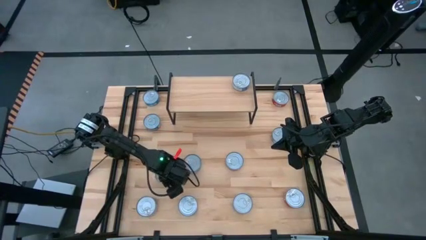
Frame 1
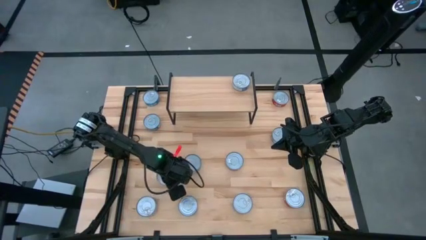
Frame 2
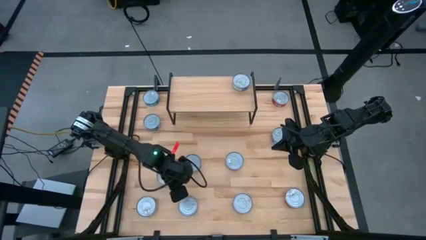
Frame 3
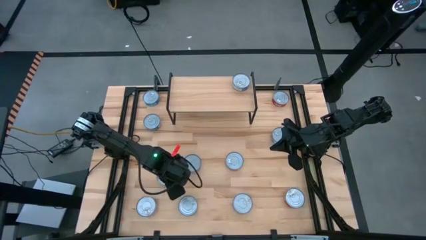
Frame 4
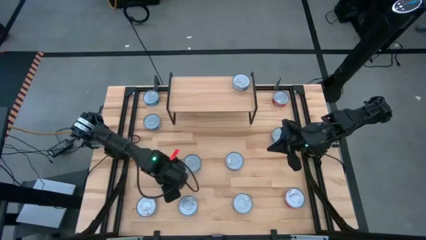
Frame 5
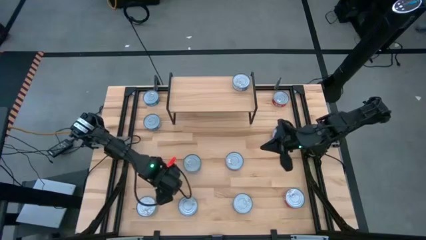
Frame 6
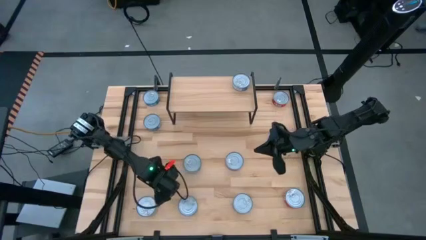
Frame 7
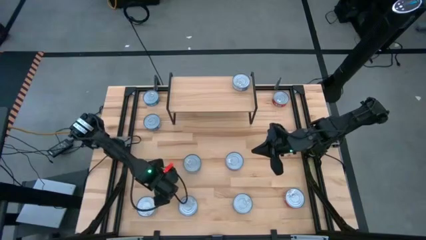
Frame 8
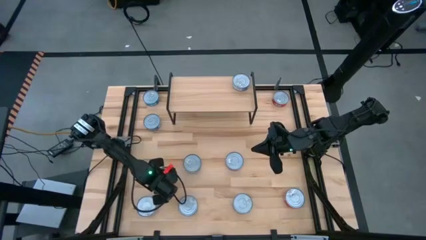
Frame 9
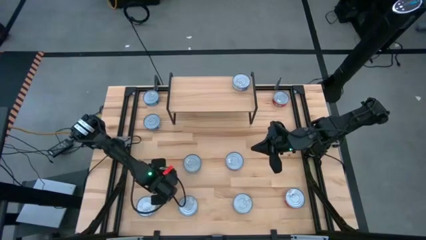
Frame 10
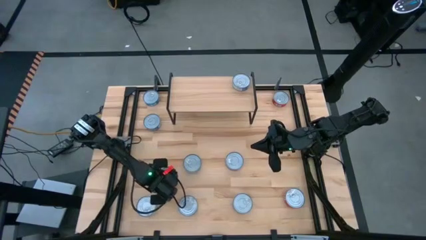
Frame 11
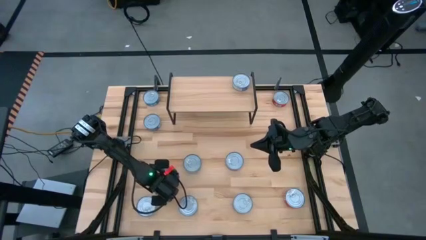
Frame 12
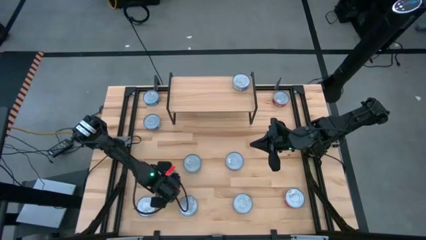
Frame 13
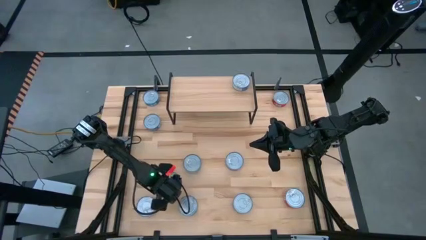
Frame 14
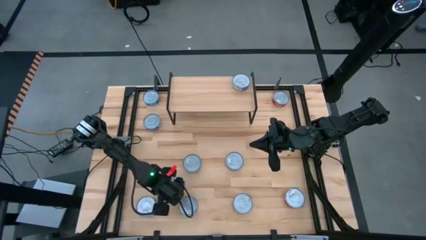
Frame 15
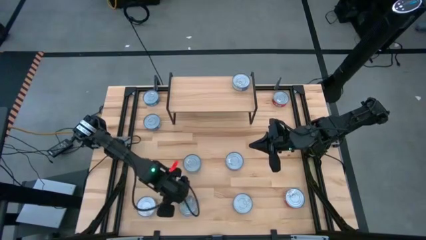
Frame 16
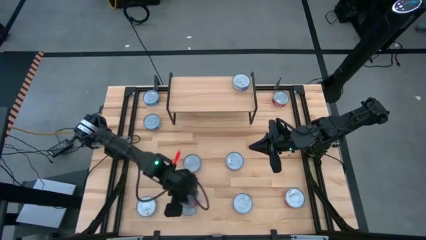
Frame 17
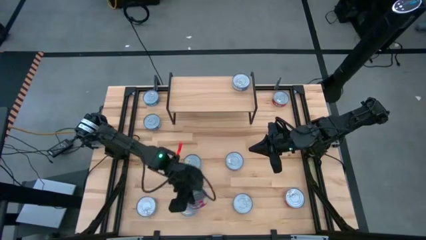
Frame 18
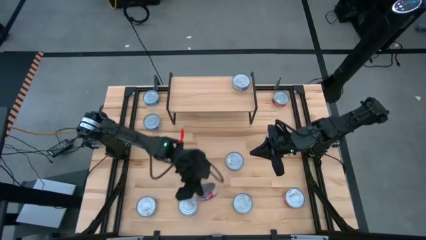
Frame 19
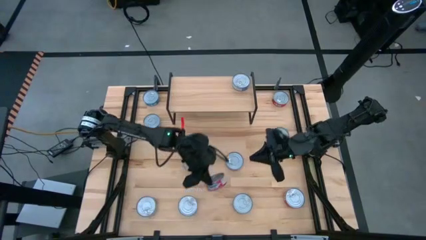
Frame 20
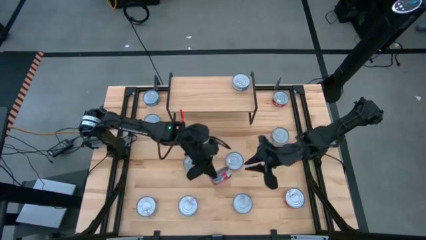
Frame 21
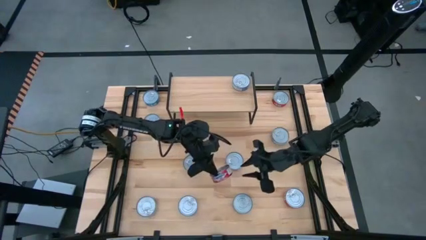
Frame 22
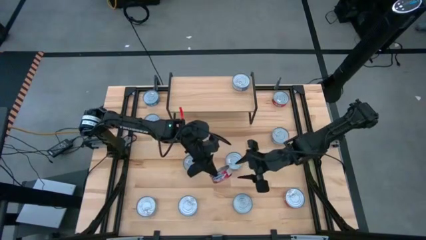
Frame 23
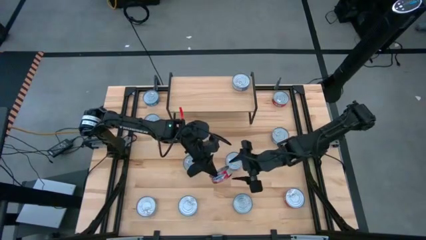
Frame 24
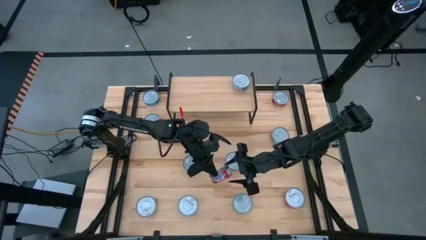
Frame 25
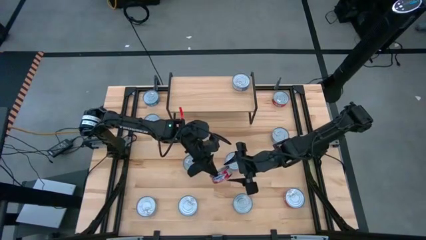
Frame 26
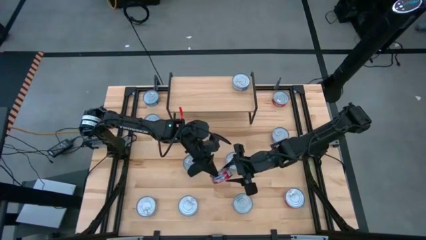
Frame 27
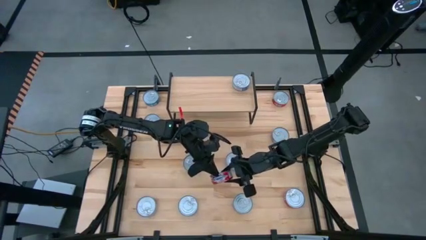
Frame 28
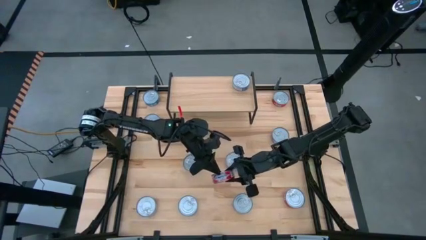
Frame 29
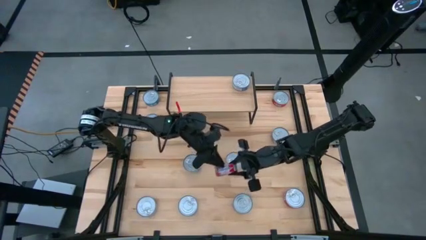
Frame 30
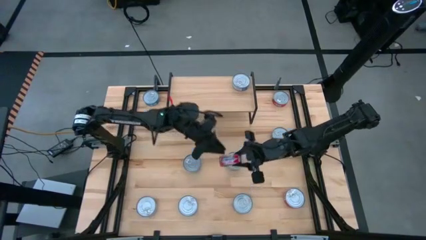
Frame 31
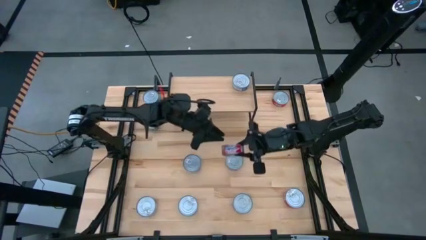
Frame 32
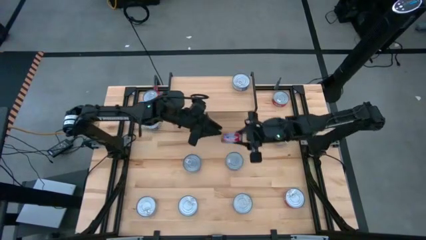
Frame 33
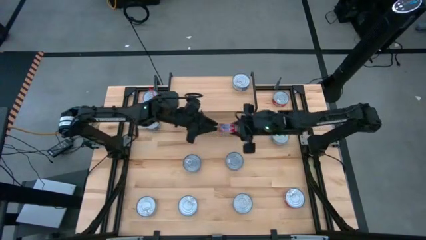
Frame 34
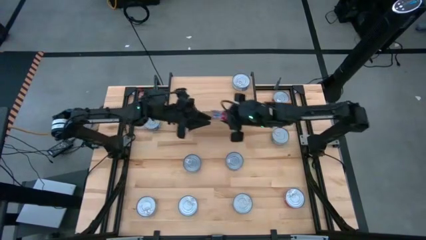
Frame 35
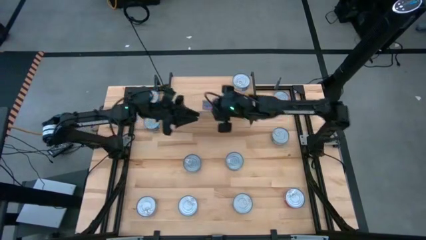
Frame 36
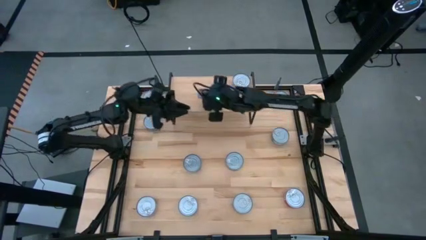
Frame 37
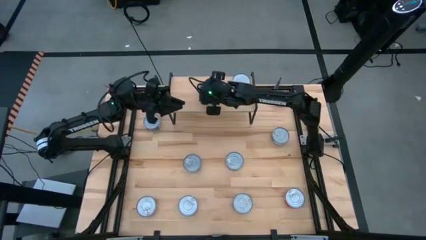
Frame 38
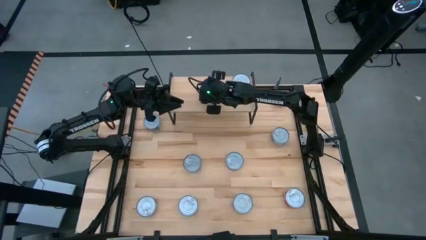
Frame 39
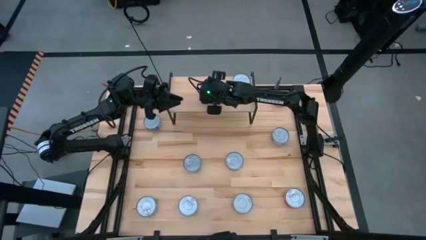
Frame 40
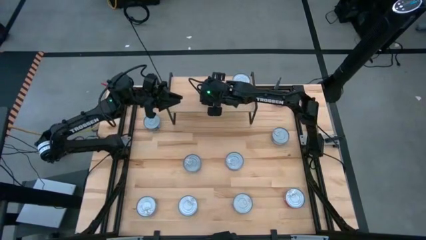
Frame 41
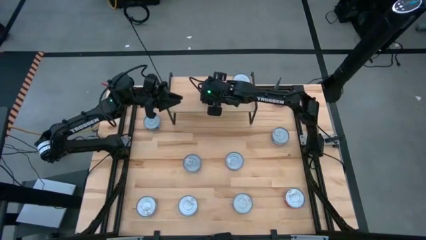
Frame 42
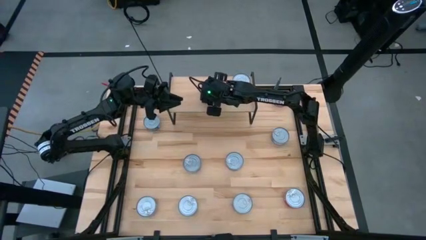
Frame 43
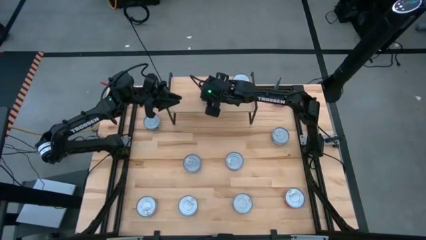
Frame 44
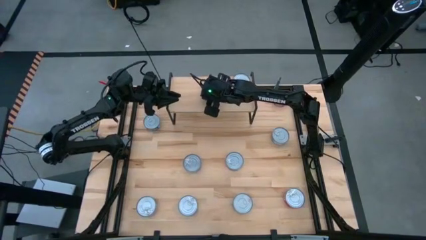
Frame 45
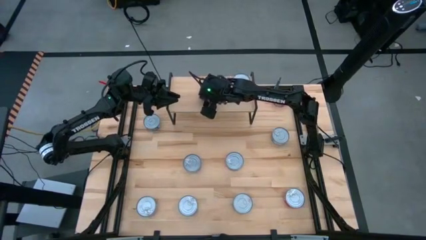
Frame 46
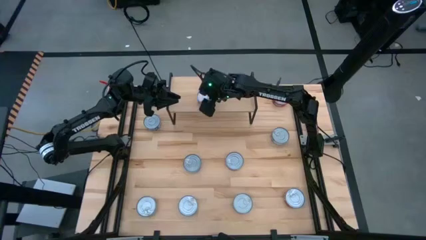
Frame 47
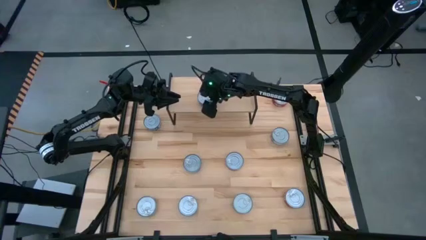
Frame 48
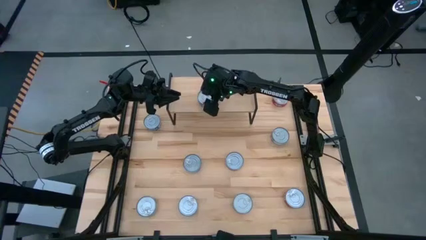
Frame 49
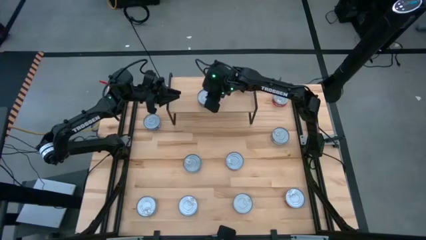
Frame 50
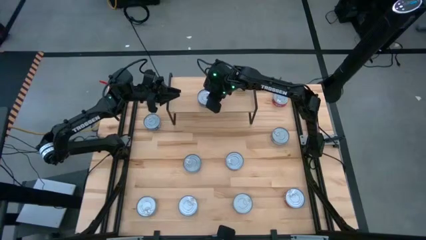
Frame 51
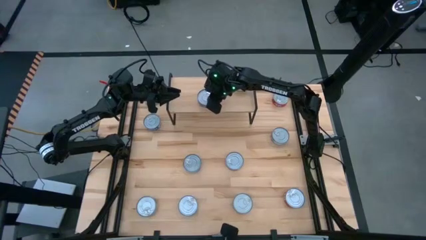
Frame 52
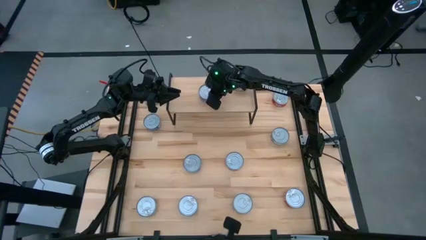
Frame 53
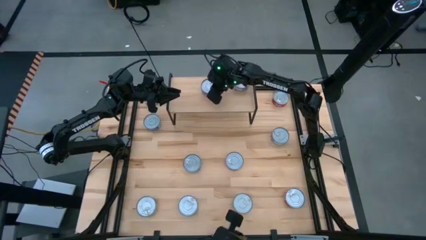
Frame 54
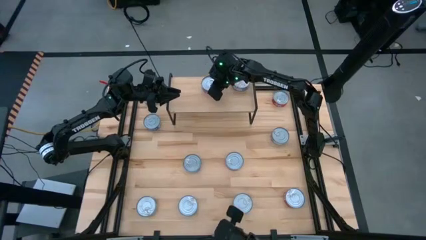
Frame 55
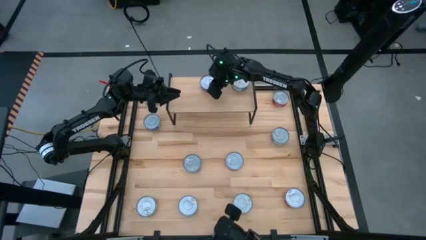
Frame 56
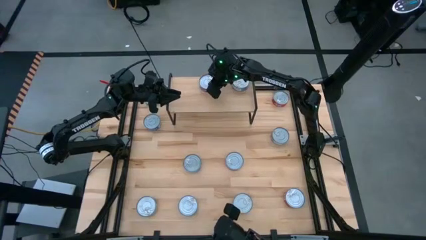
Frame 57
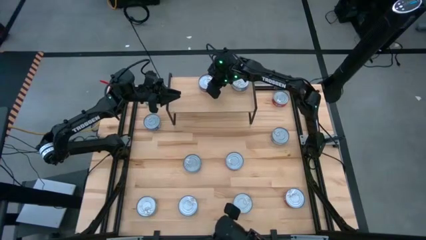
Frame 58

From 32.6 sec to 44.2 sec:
Task: Stack canned seafood by type on shelf
Put the middle left red tuna can on the shelf

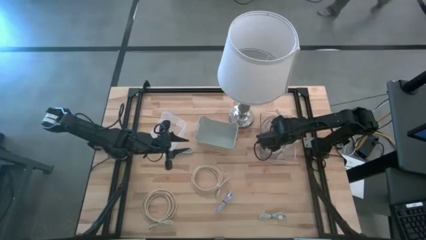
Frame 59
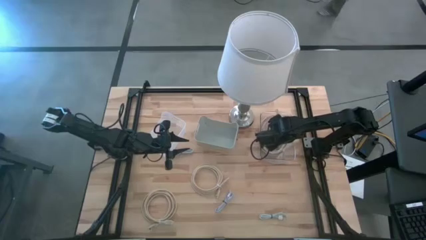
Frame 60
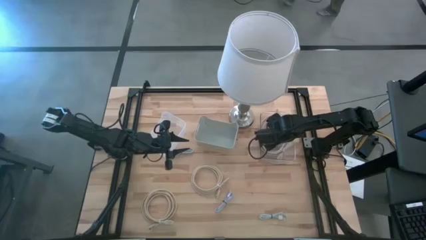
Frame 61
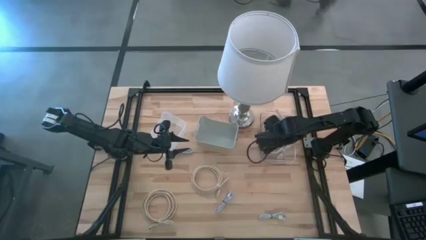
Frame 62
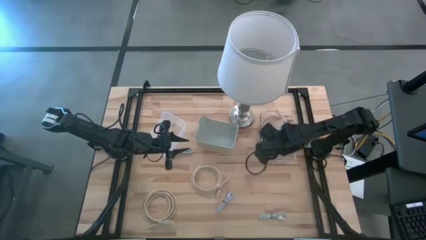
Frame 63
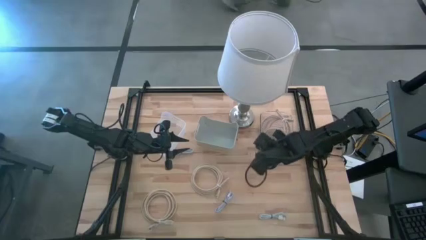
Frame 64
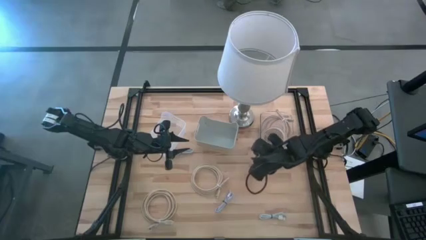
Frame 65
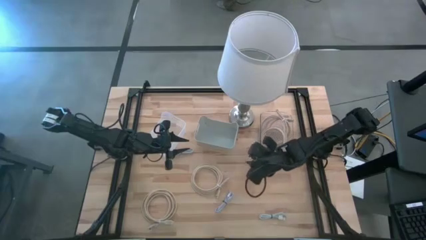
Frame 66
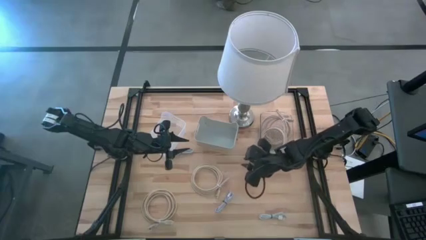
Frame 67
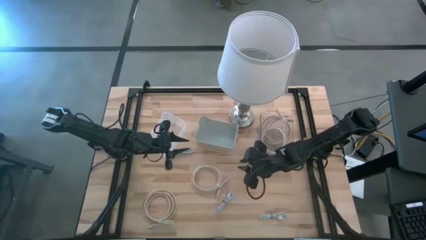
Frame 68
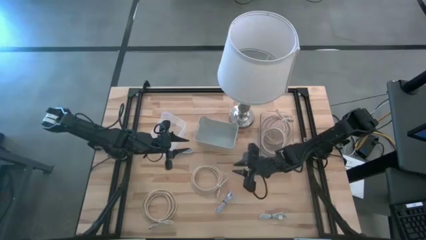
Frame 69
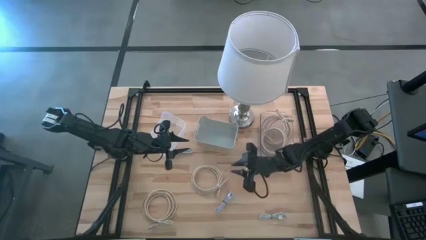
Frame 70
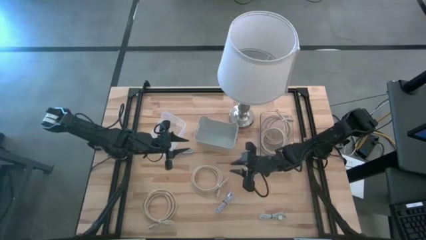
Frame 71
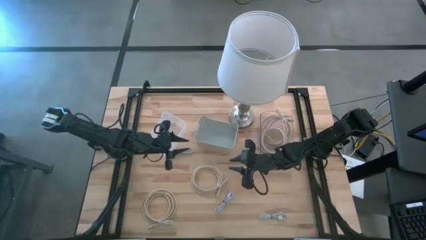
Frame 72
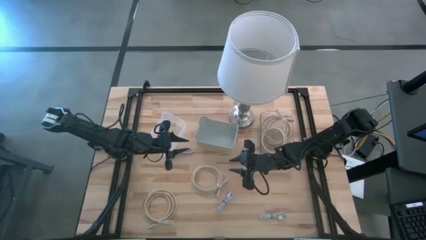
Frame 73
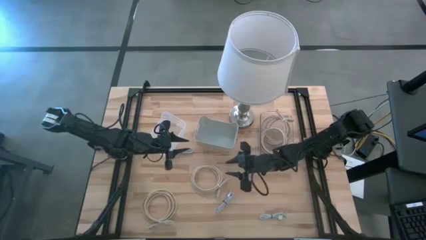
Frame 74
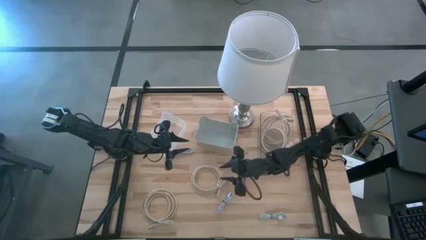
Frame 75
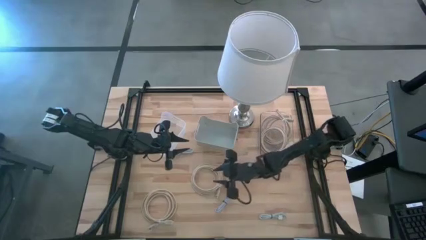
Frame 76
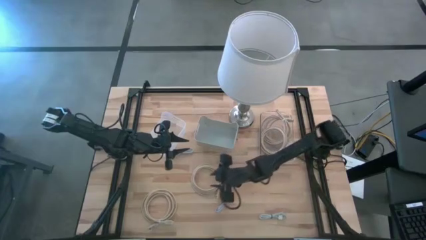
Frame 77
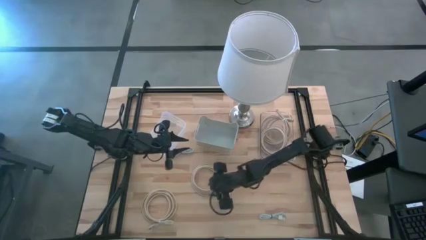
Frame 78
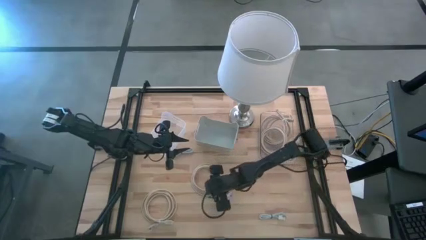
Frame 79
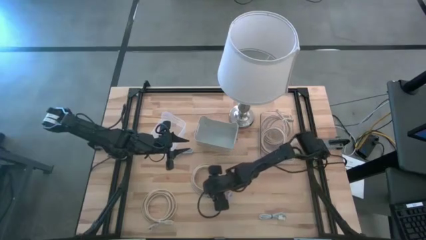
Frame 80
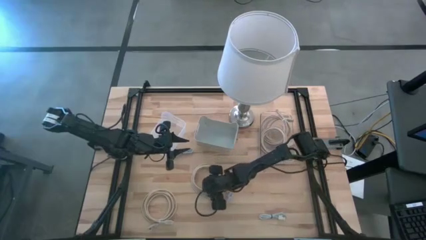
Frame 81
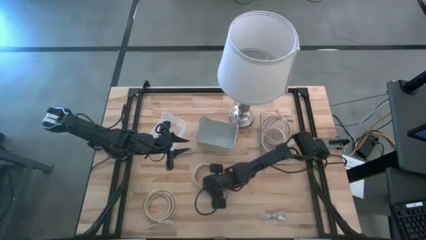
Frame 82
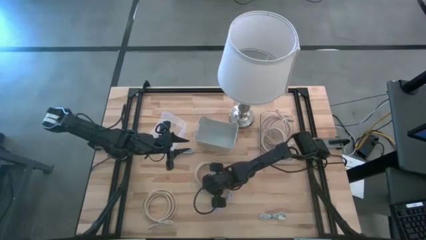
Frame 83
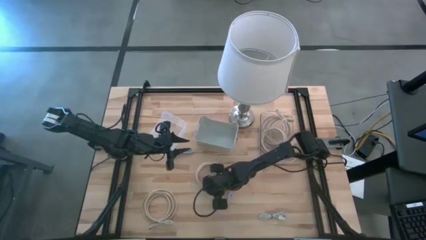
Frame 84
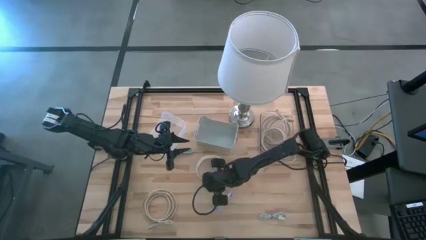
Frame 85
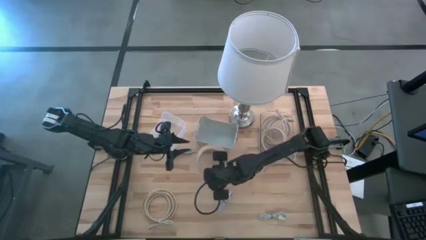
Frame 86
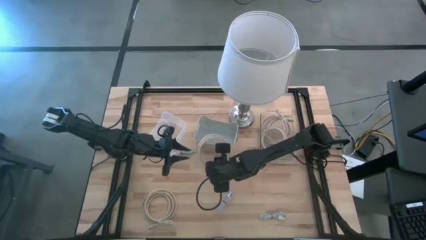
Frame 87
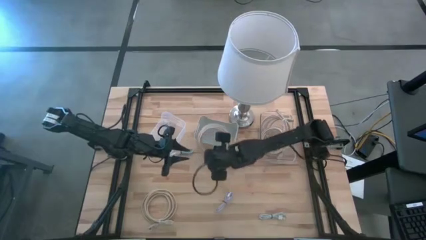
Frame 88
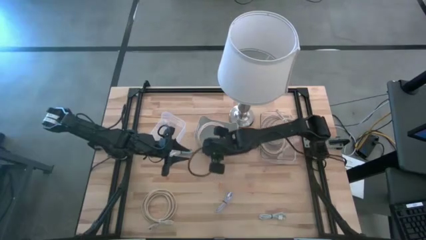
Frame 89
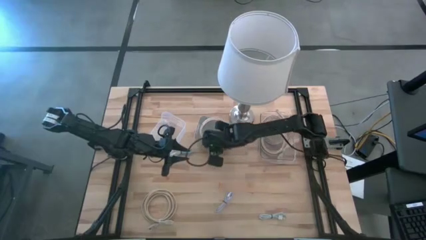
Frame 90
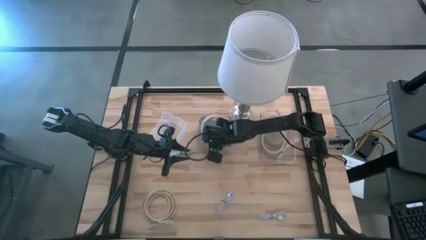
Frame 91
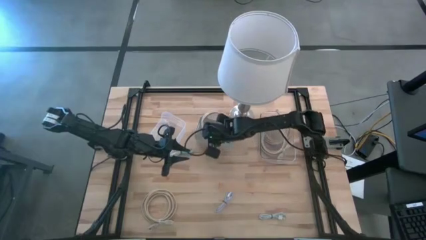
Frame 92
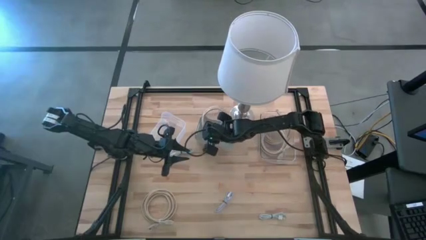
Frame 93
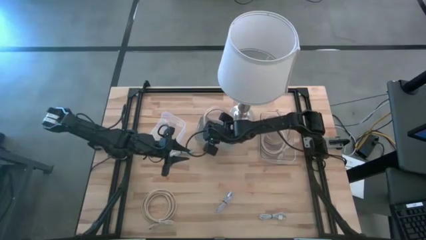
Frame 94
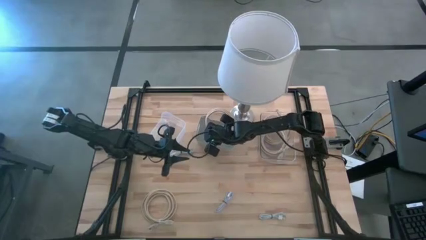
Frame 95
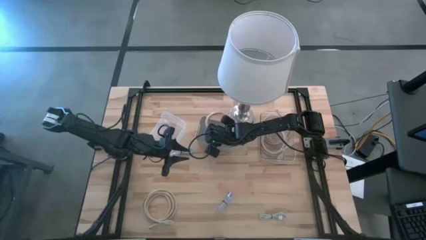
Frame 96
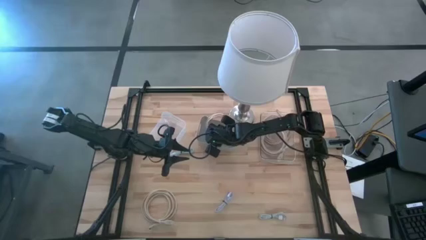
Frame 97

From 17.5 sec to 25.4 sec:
Task: Pick & Place USB Port
Put the top light brown HDMI cable into the gray bin
